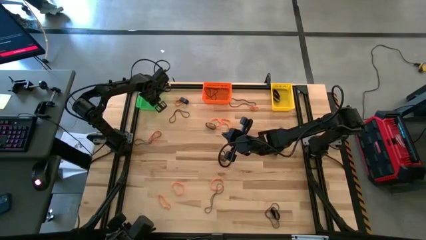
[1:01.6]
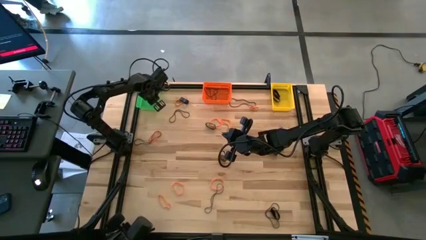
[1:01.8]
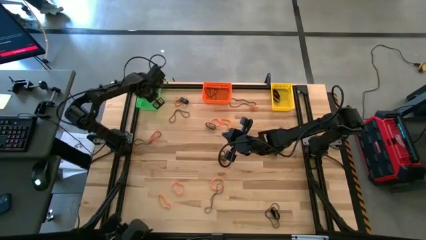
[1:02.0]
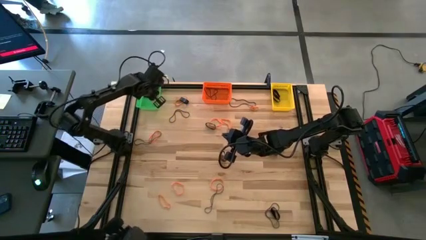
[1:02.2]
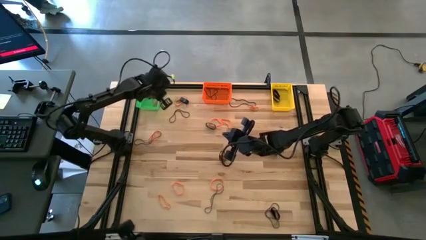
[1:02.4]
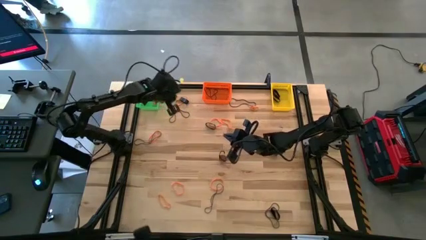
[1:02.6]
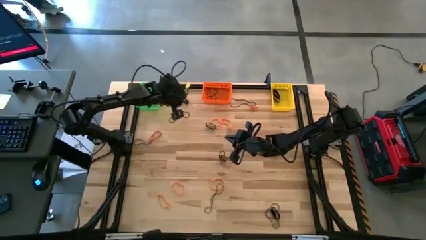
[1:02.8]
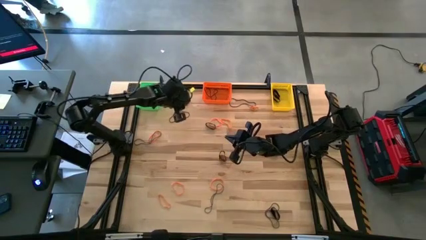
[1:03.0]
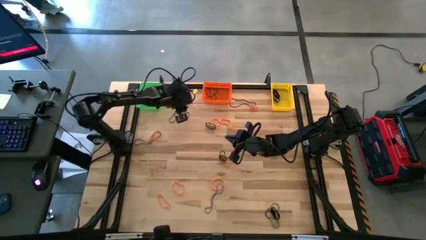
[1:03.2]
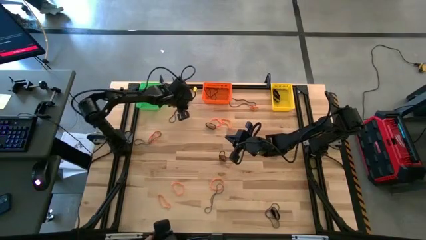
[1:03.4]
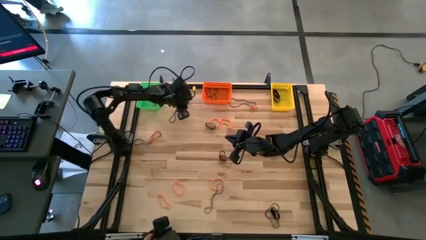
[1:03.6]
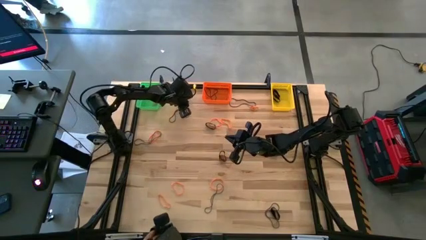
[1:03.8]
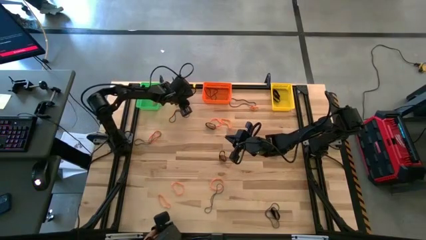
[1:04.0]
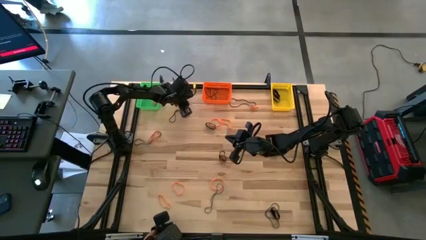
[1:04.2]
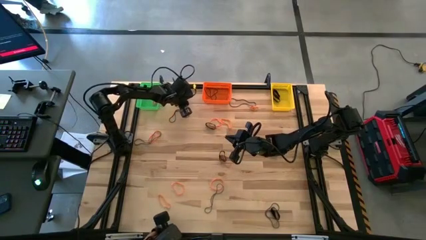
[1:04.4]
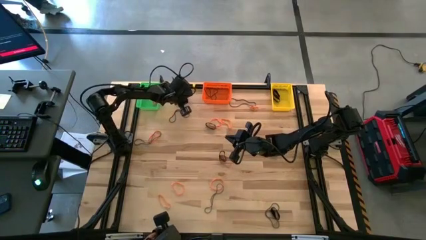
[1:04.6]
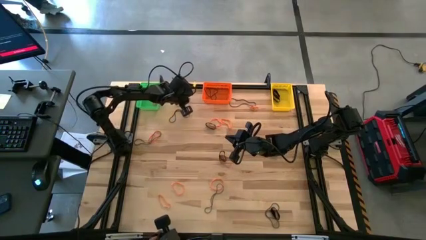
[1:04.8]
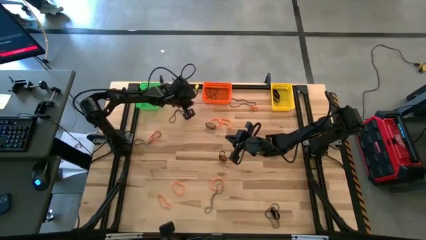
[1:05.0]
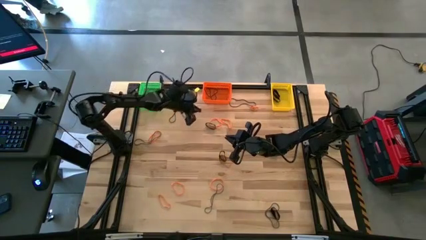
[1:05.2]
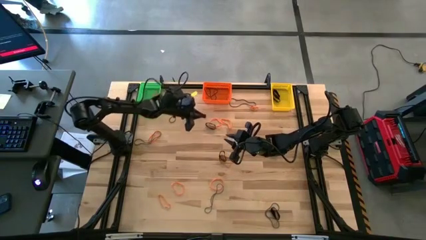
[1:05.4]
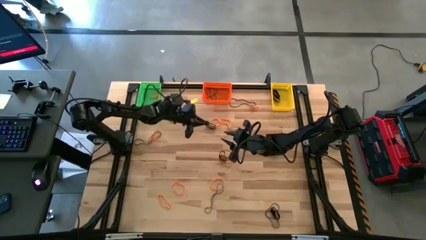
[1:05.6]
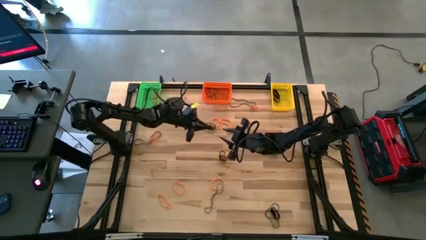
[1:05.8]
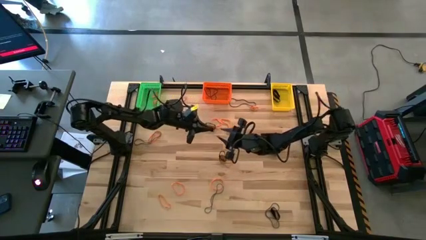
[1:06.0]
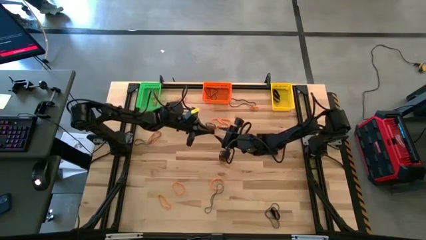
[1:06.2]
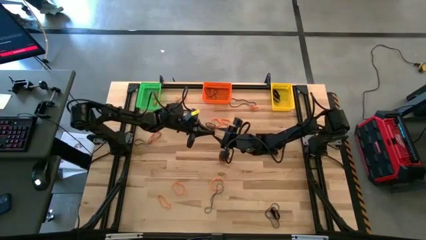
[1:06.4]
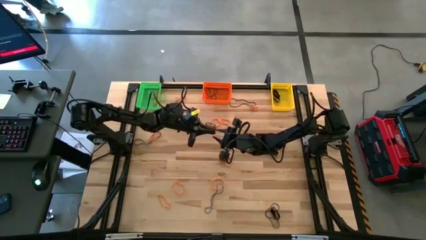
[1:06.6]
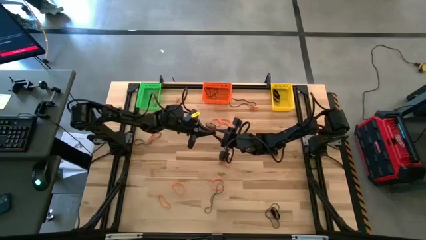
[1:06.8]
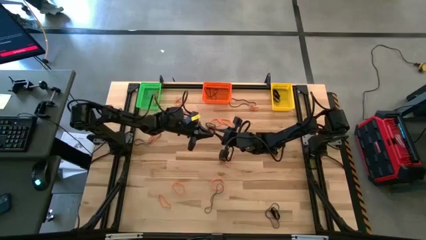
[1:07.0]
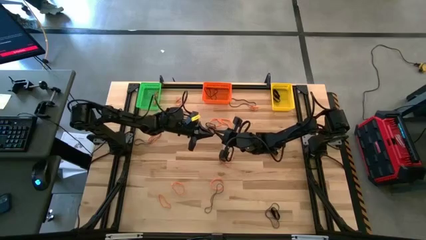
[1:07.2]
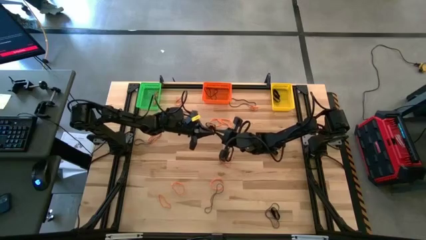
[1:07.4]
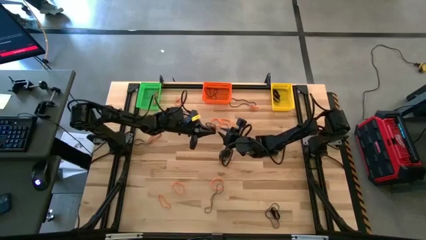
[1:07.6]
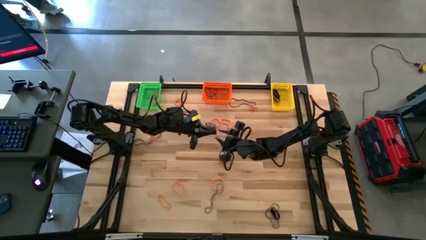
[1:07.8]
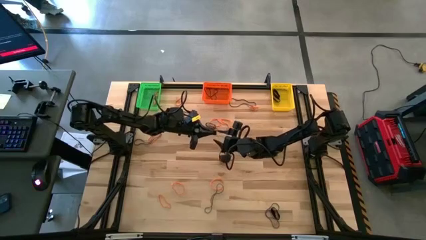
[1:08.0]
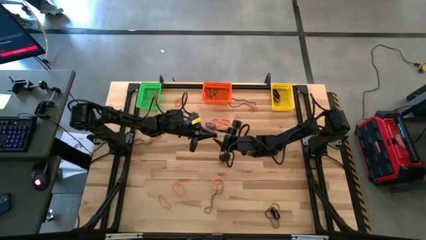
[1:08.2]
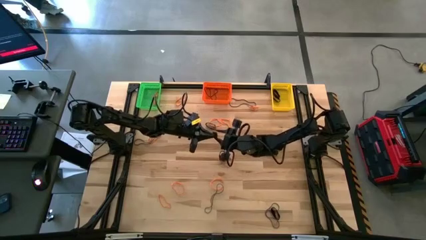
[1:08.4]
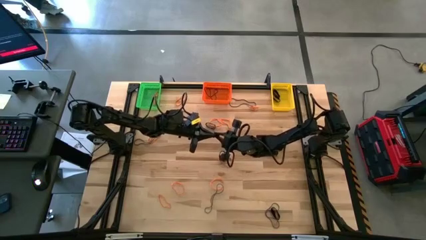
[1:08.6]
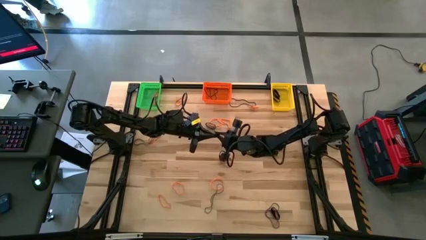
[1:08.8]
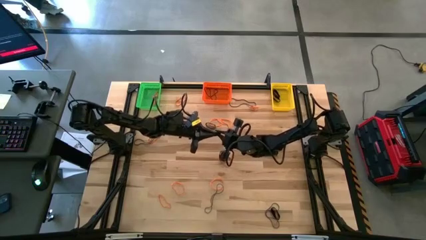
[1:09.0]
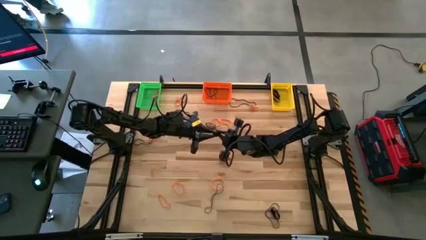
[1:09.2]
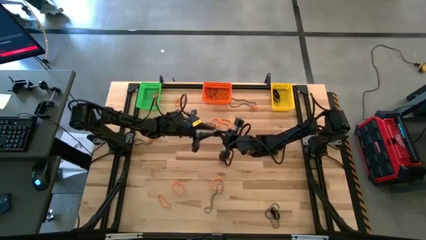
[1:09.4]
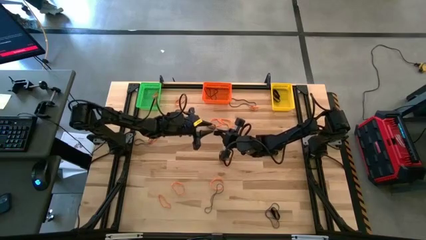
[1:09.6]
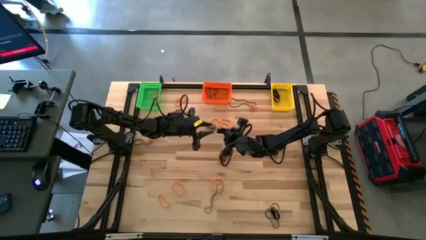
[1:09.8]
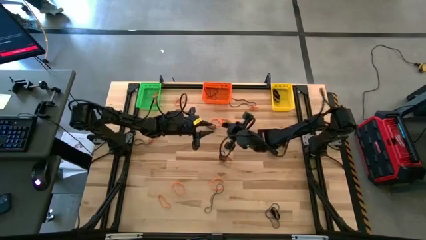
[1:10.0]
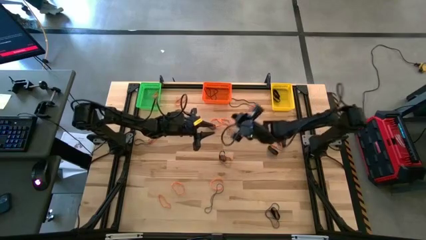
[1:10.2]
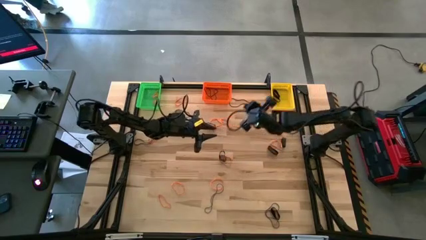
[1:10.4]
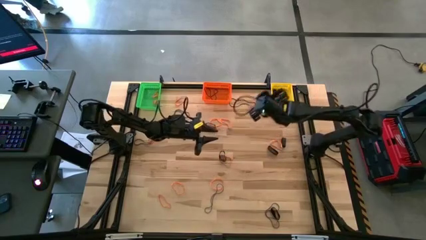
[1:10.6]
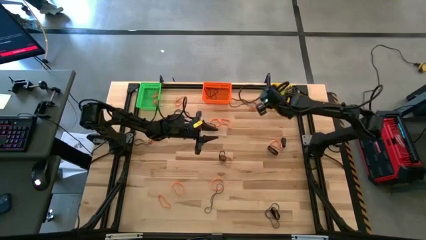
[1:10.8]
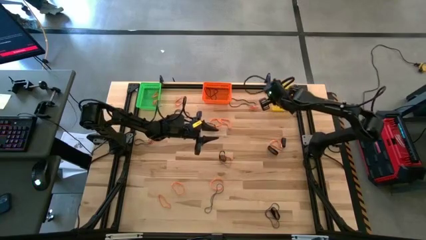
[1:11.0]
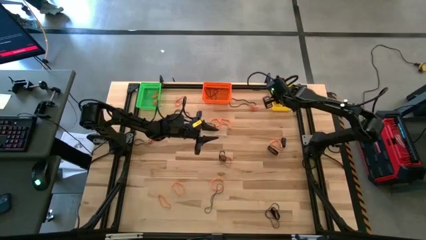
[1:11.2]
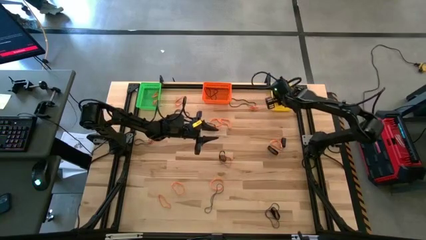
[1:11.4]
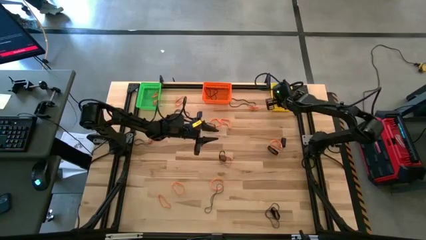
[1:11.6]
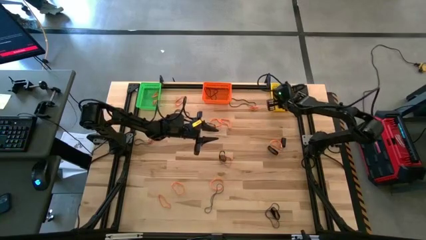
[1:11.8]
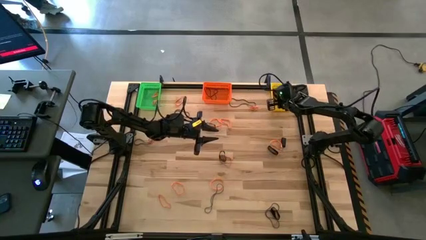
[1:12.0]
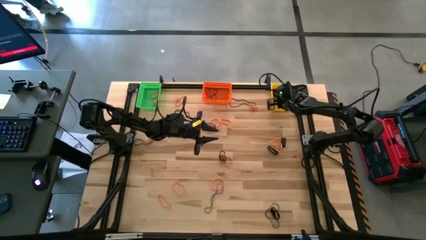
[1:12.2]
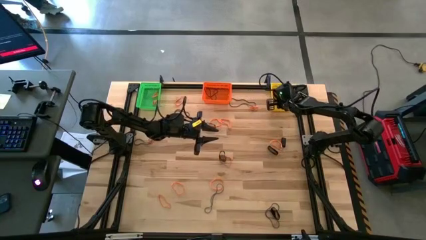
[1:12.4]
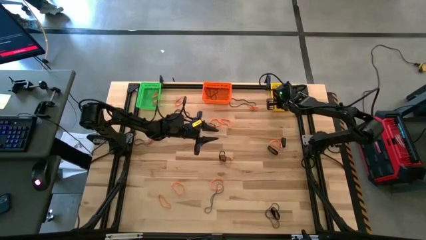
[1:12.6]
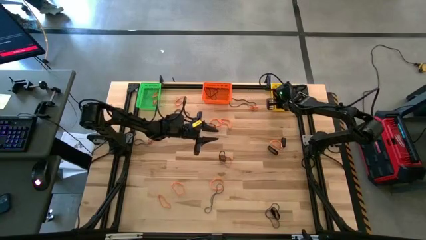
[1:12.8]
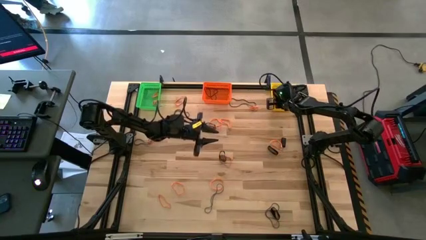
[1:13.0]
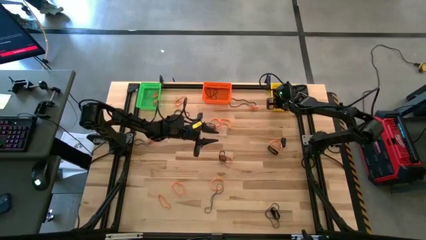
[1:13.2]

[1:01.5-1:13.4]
Task: Sort rubber bands into baskets
Put the top left black rubber band into the yellow bin
